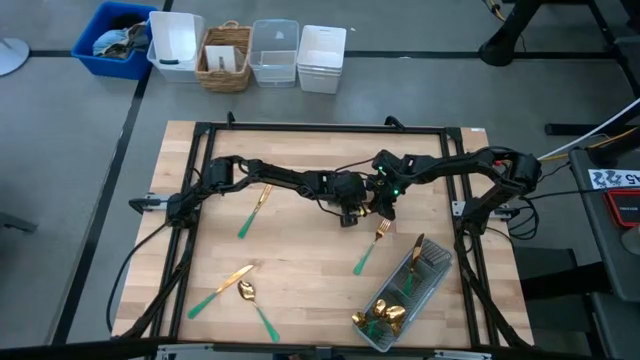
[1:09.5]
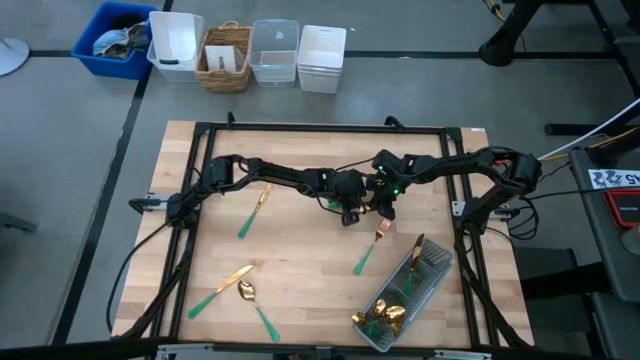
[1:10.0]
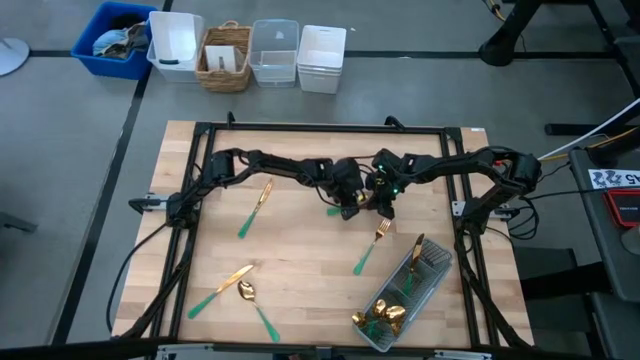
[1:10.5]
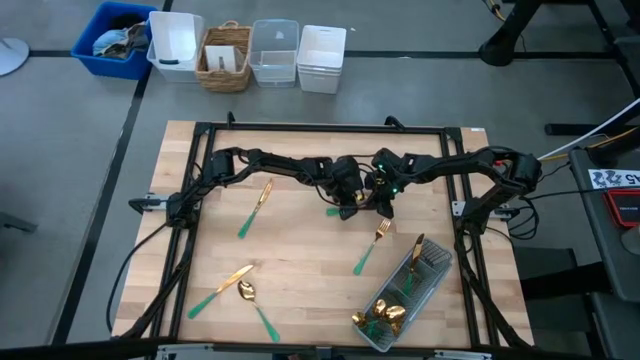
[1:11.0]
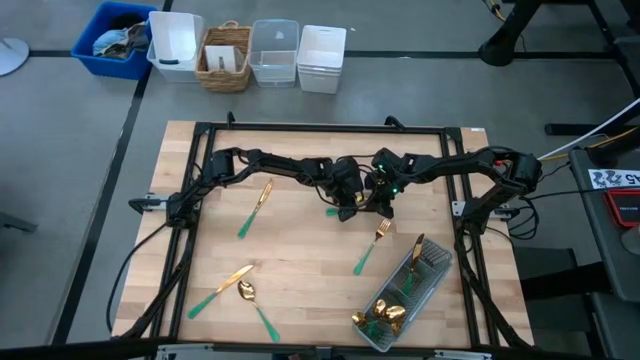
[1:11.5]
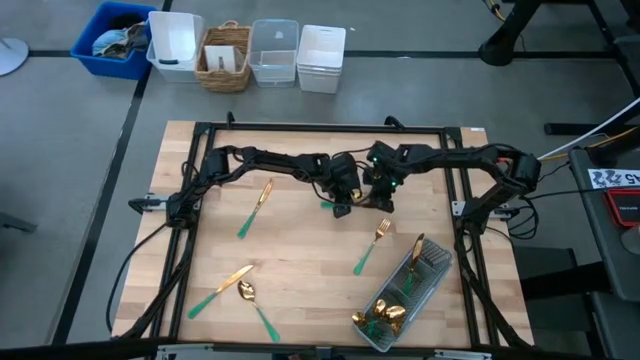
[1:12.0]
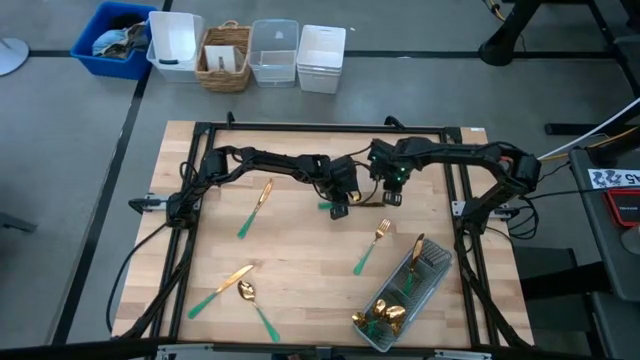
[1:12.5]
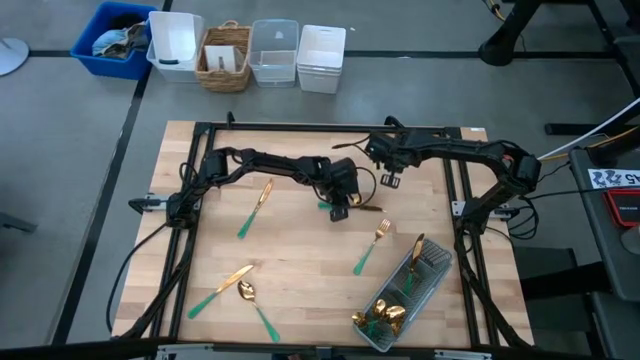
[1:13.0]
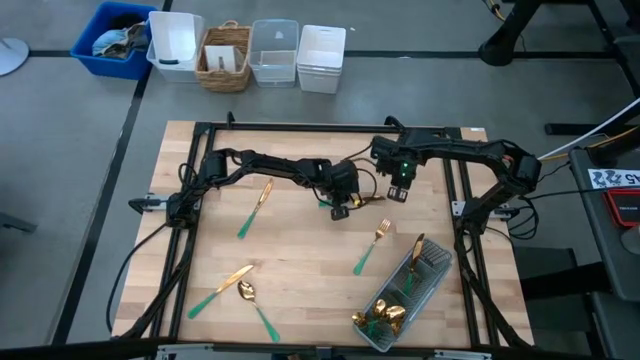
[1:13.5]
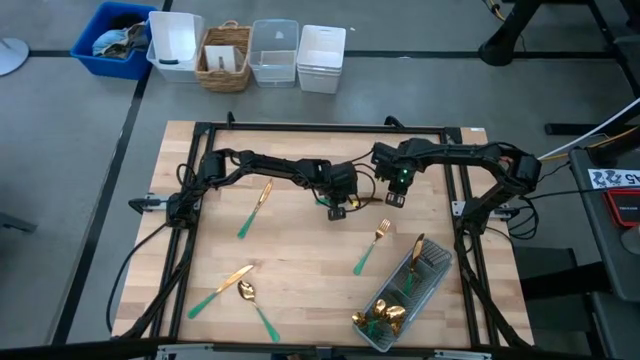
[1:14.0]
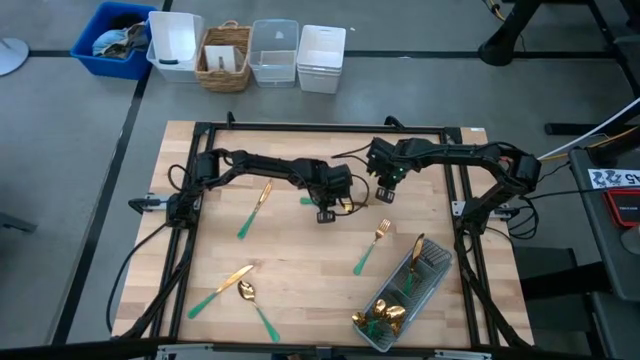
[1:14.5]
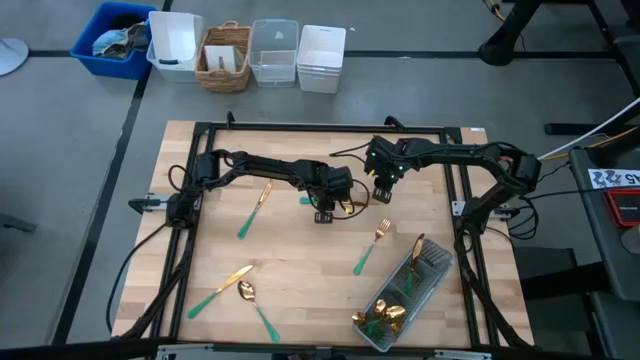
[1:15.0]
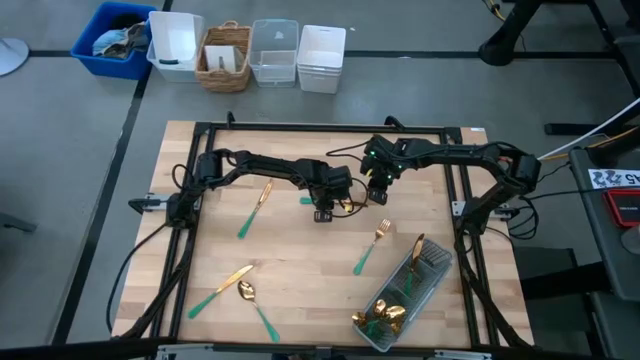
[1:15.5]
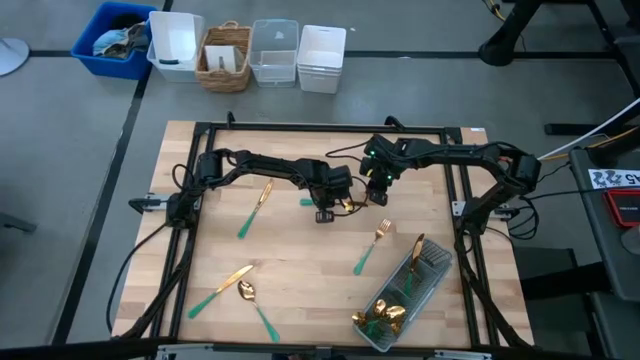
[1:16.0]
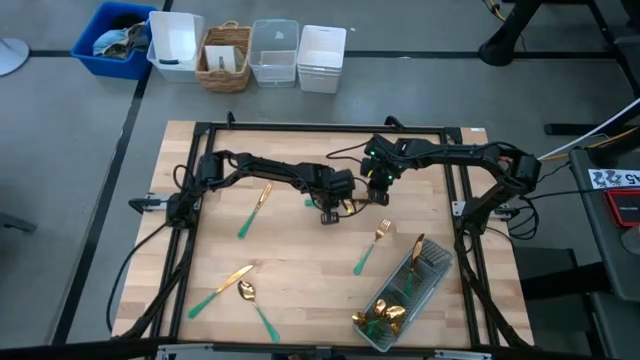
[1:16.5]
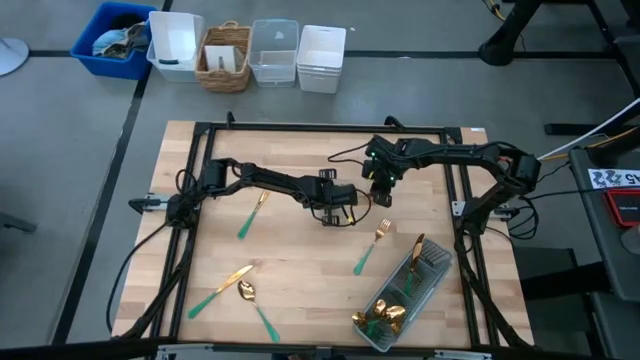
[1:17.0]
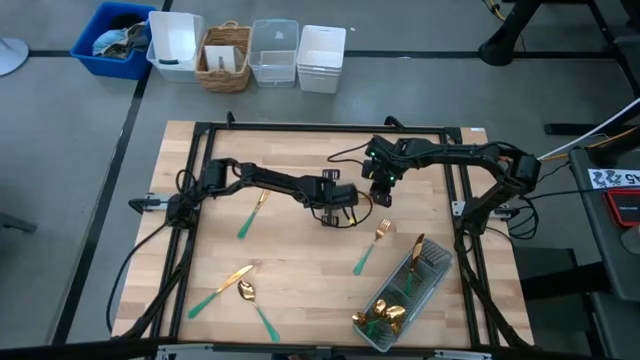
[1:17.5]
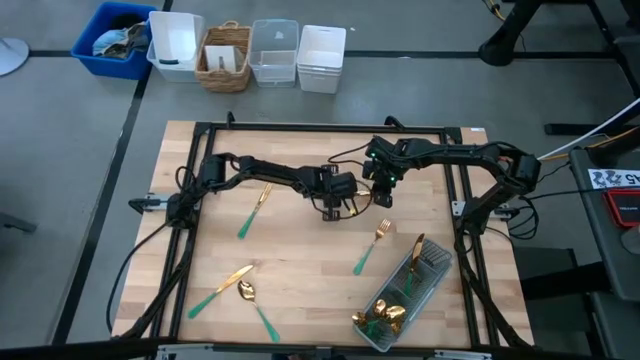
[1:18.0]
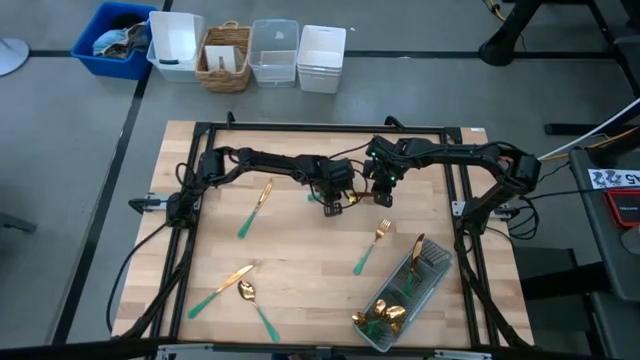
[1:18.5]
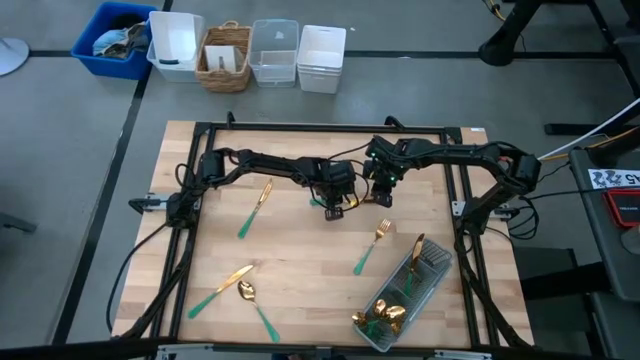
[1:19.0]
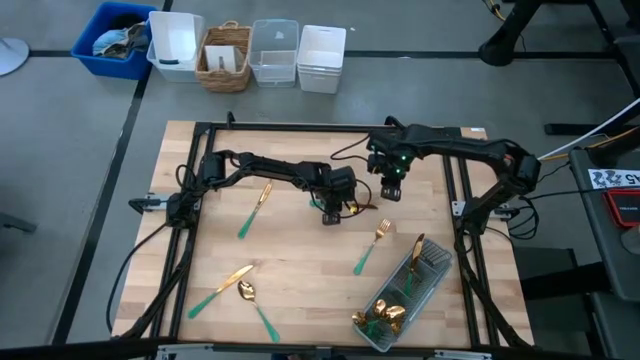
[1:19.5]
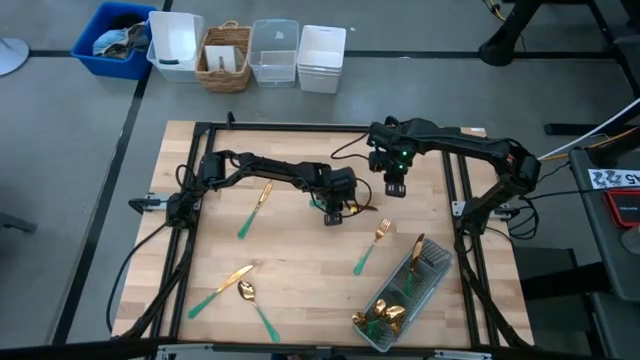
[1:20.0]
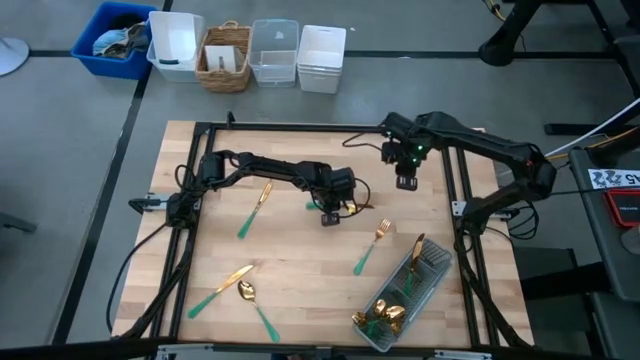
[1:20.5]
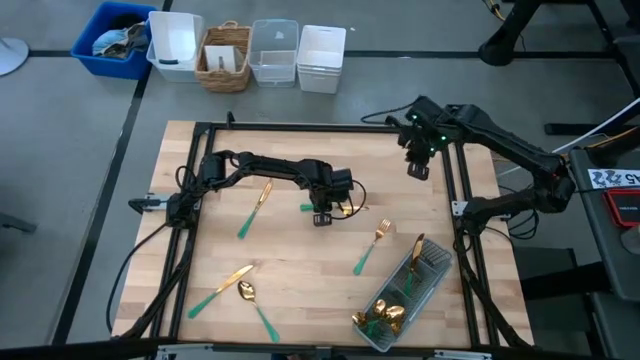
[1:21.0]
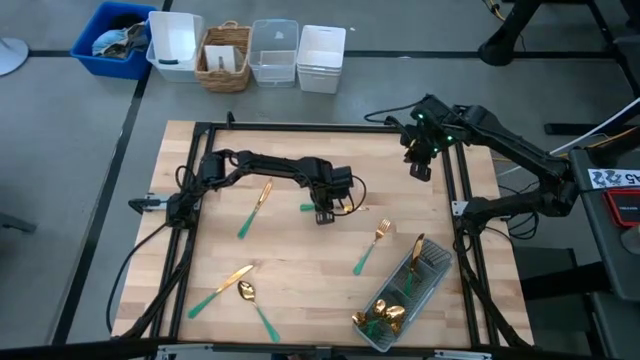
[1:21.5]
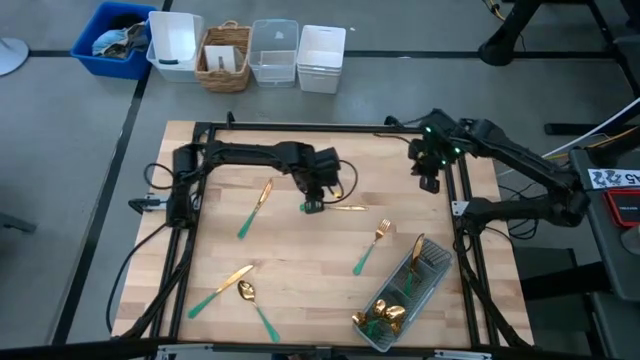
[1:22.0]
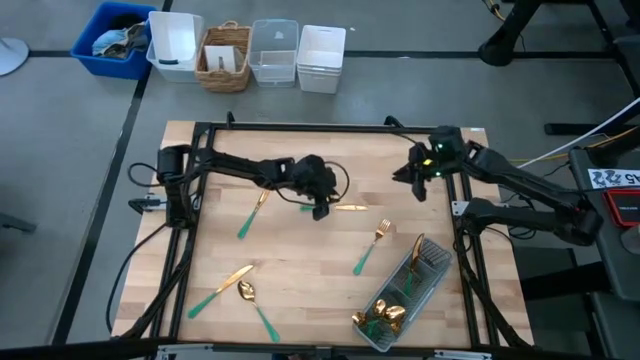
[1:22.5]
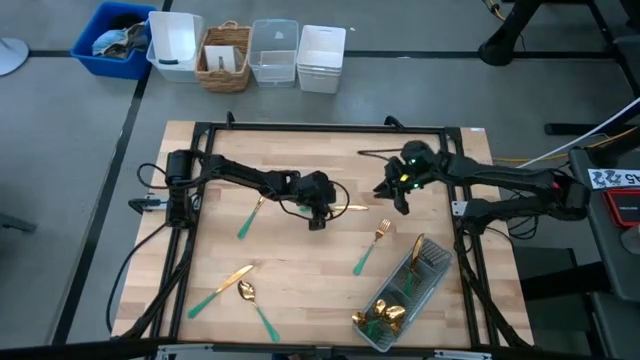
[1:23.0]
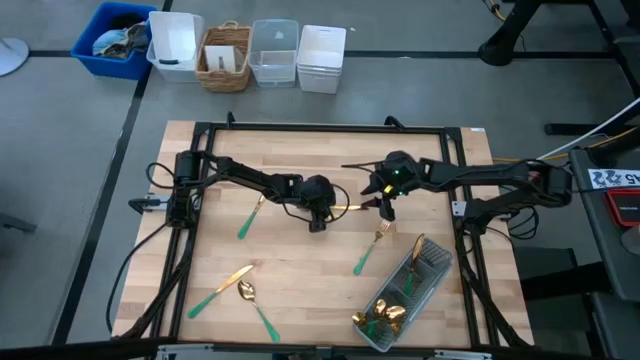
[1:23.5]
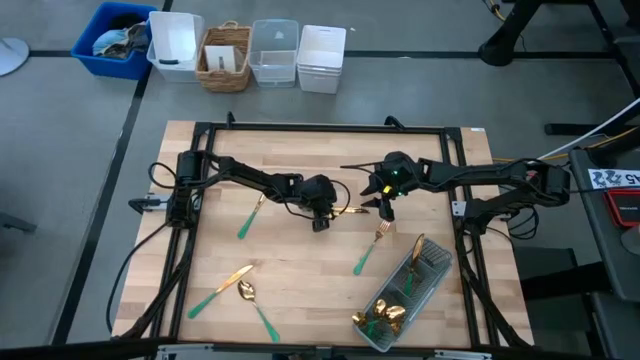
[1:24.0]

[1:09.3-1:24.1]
Task: Sort silverware
Put the top right table knife into the utensil organizer

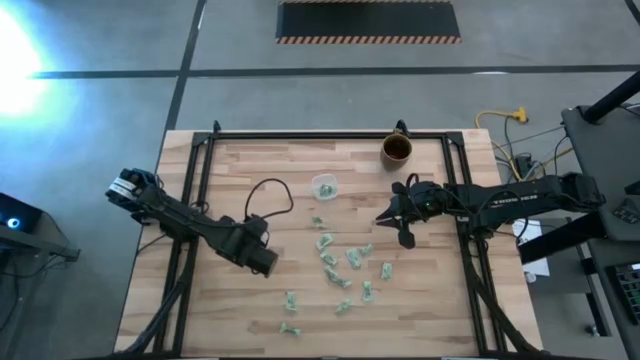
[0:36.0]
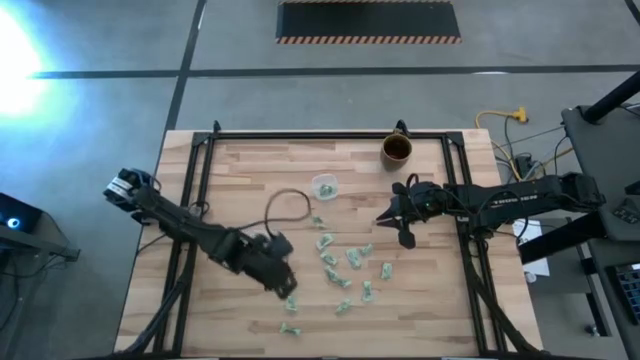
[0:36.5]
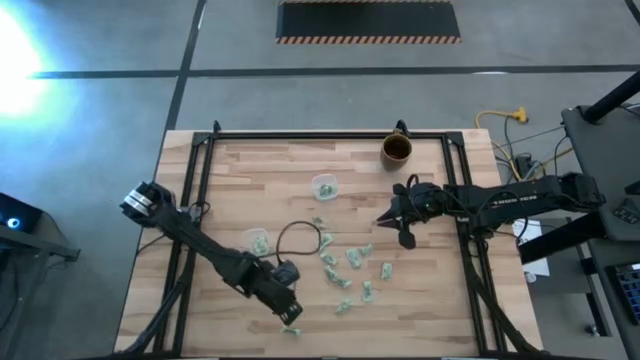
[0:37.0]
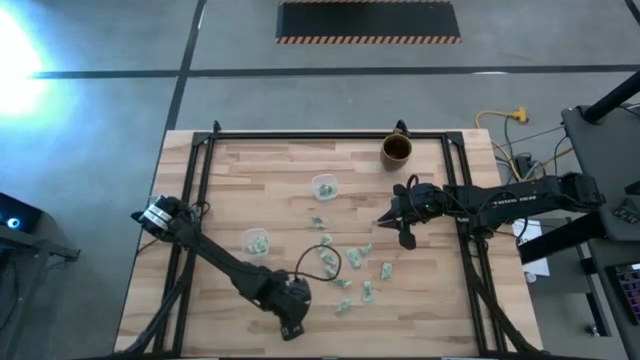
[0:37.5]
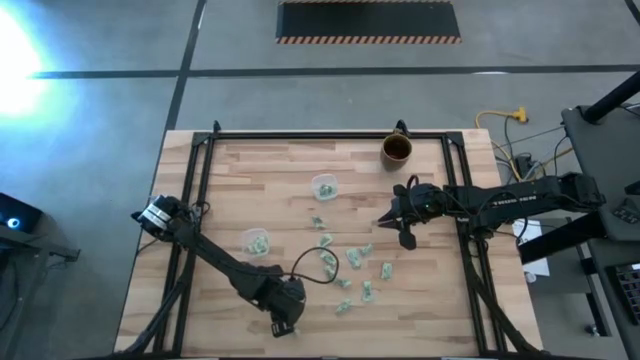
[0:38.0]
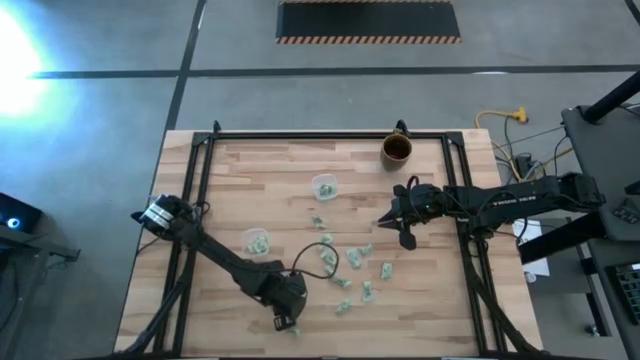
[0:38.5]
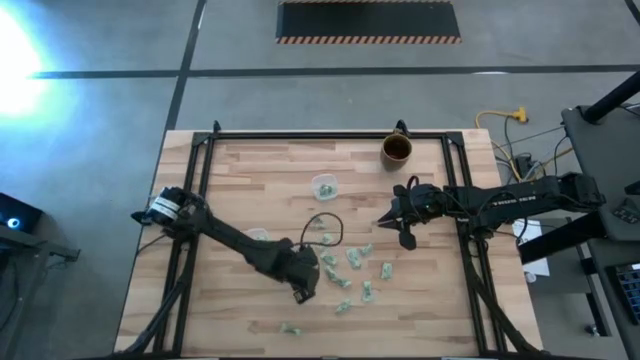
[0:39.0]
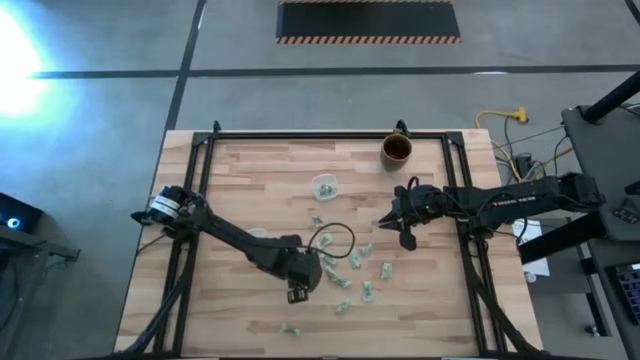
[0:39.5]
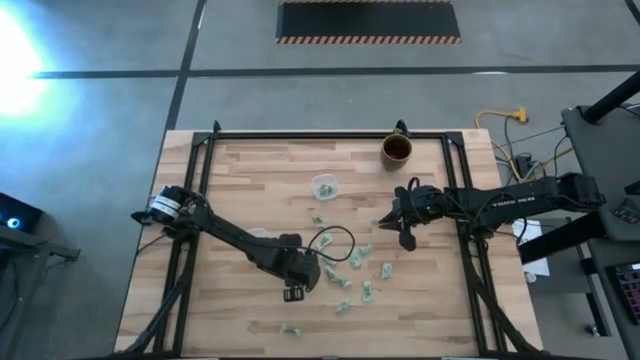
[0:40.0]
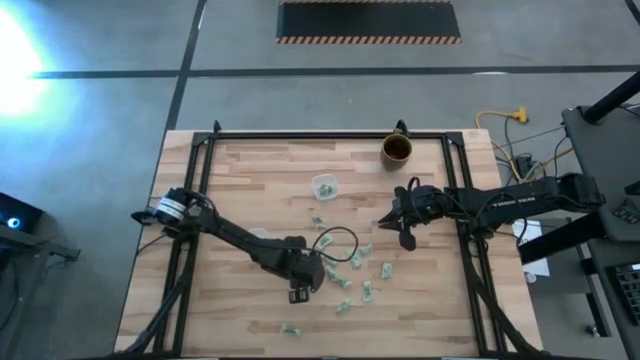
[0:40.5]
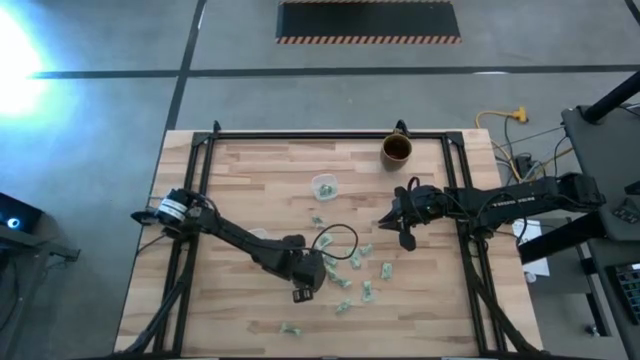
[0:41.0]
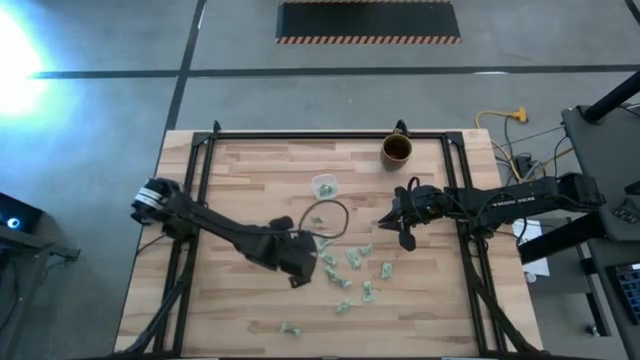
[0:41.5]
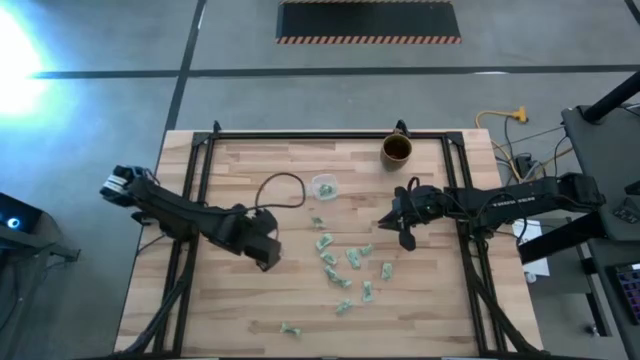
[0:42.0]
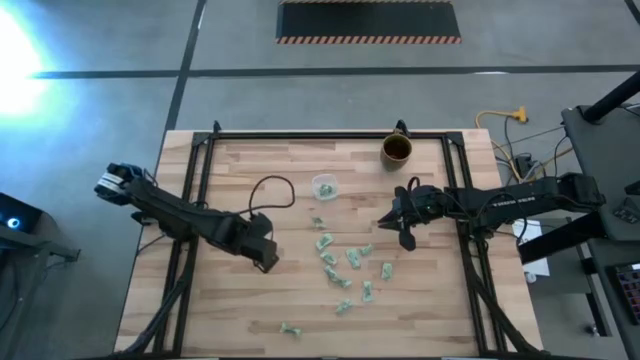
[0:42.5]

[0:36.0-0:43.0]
Task: Pick and place Stevia / Truvia into bins
Put the stevia packet into the bottom transparent container
